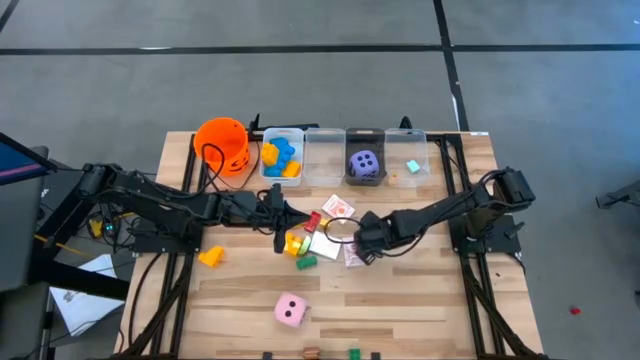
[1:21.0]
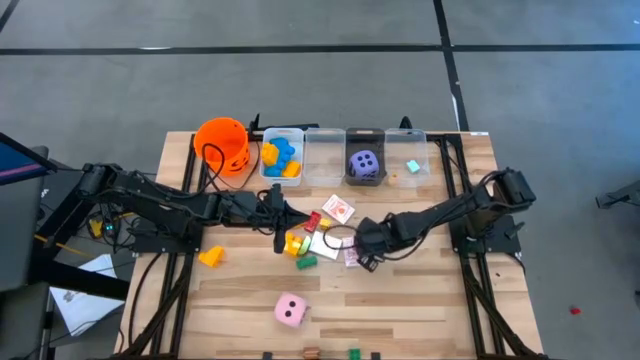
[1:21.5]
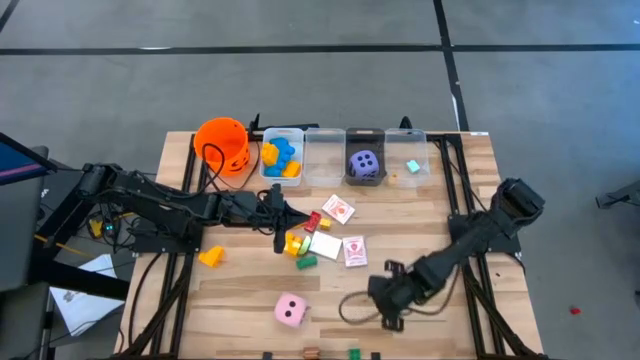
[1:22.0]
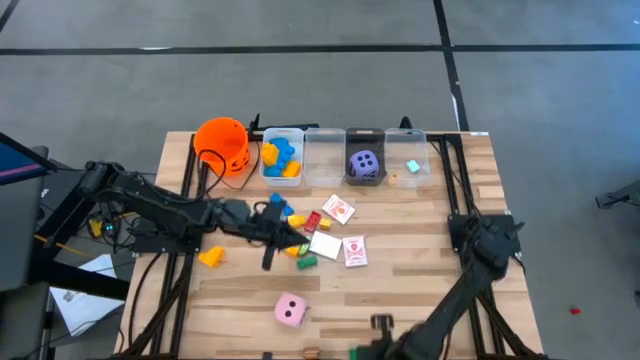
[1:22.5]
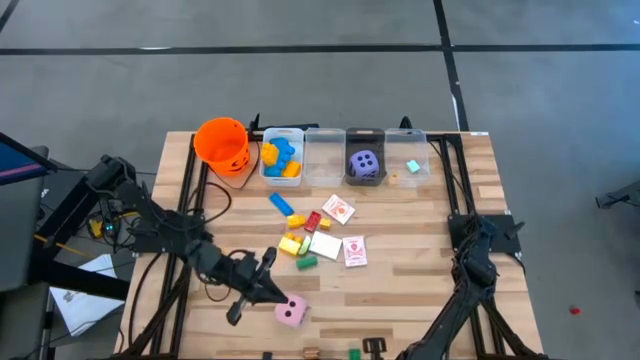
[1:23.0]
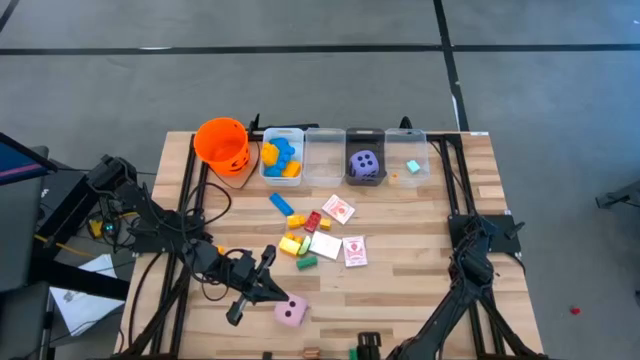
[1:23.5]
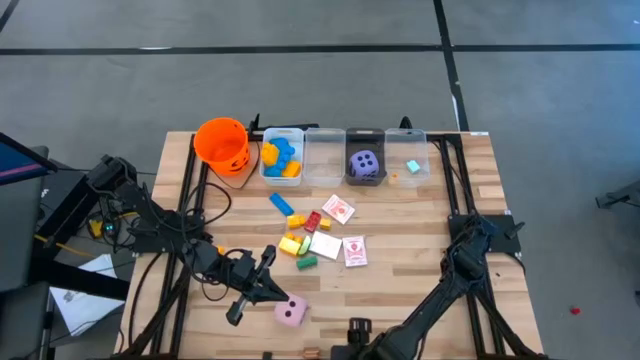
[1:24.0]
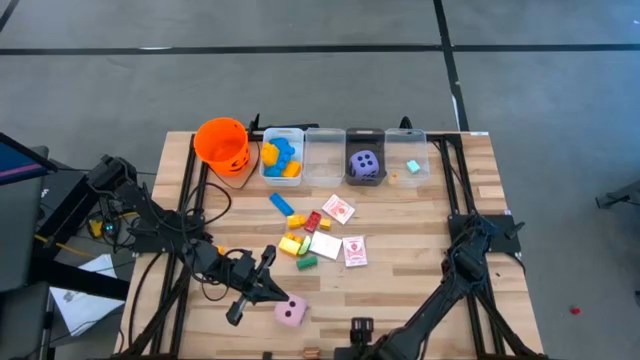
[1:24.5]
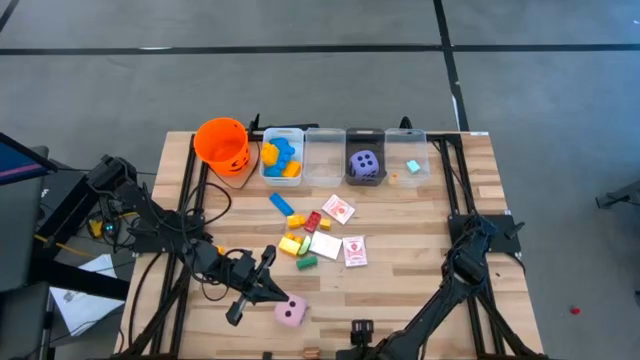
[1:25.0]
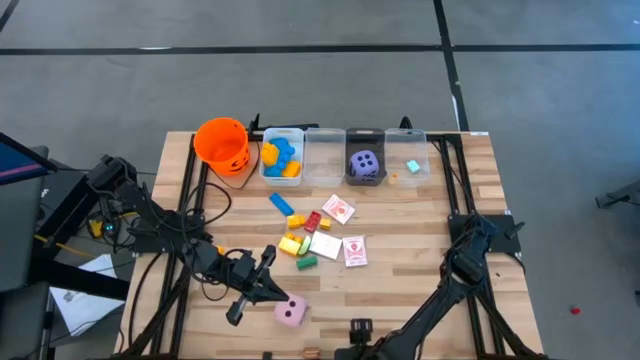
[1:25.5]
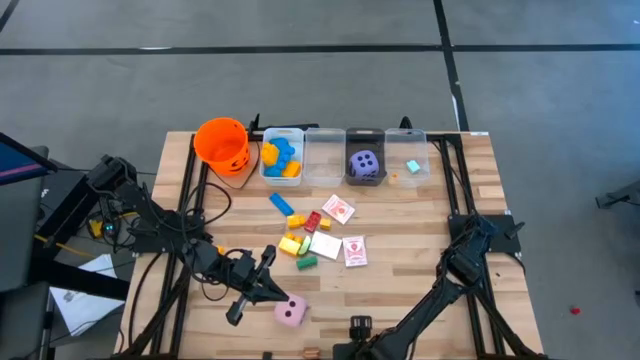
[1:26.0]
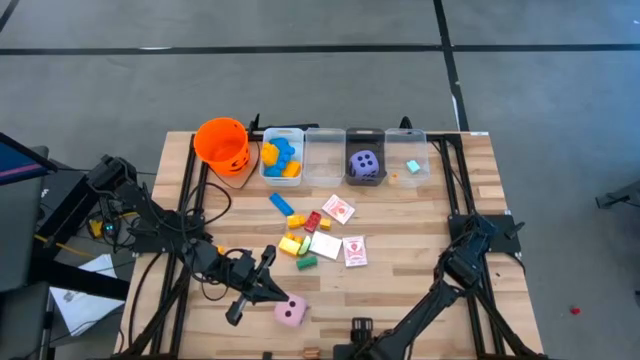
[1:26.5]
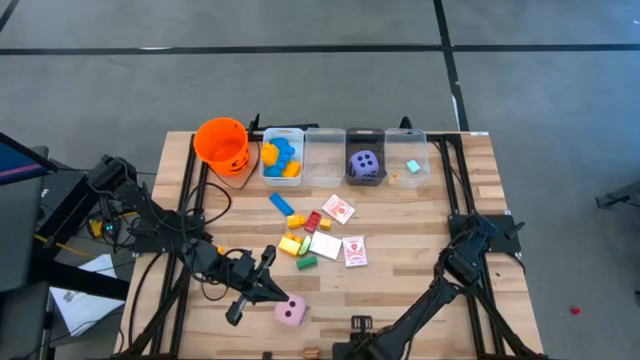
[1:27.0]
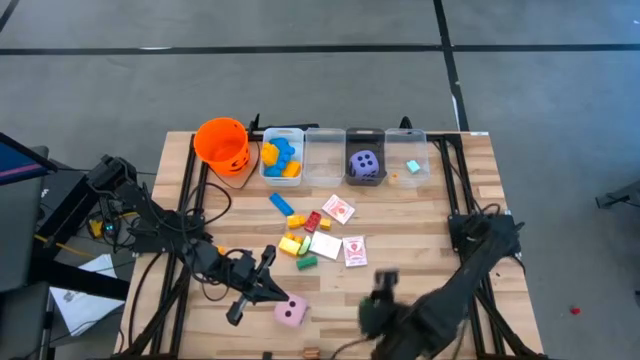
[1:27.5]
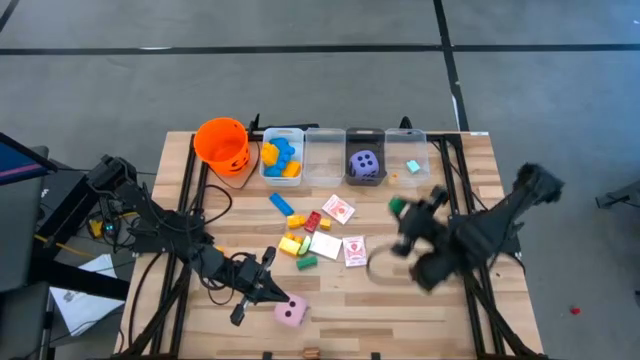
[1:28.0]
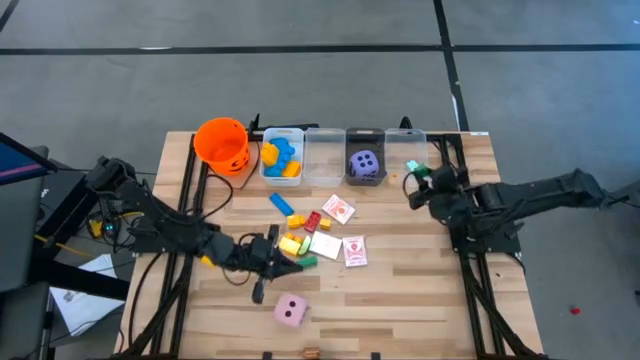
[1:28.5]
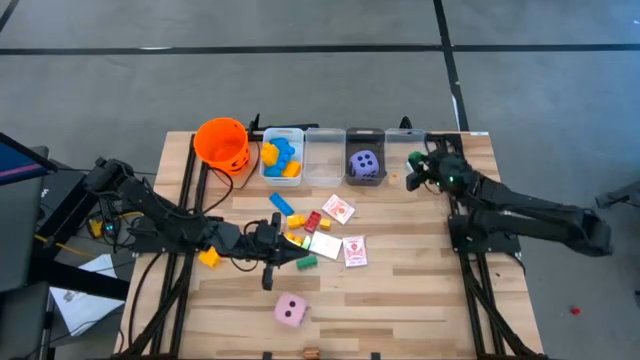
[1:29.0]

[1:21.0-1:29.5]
Task: Pick & Place Toys
Put the bottom green game piece into the right transparent bin

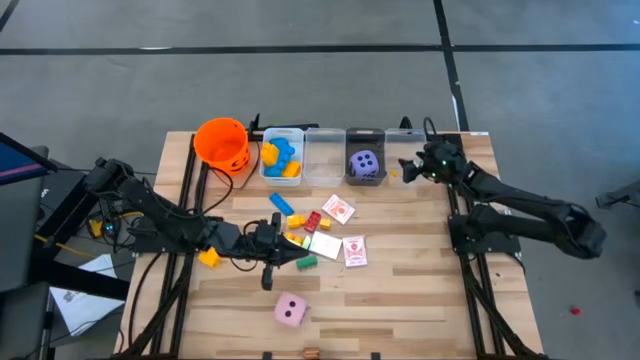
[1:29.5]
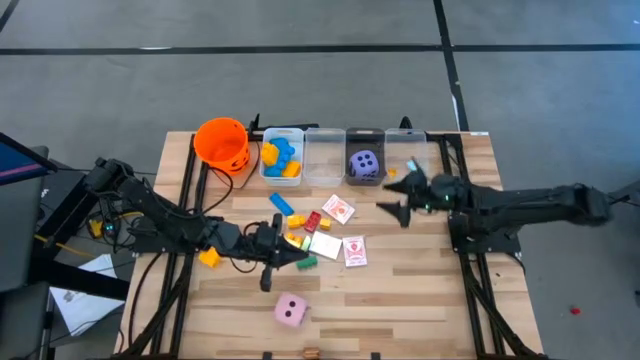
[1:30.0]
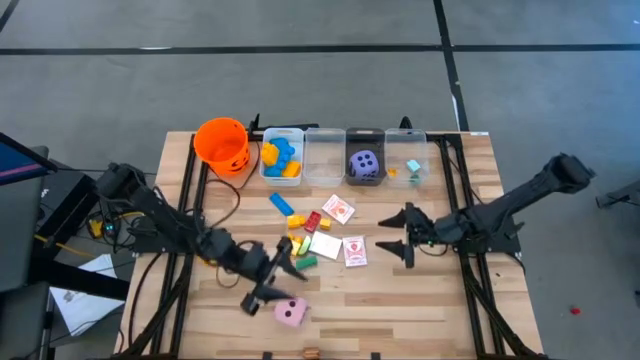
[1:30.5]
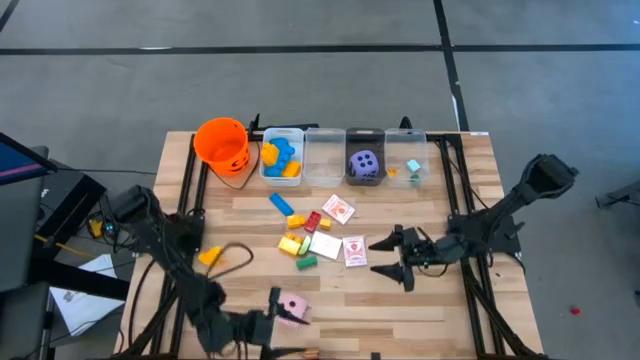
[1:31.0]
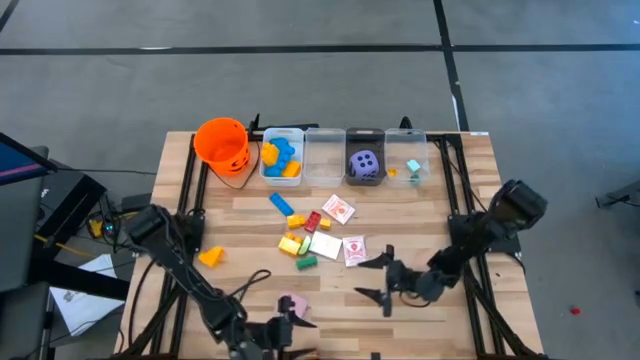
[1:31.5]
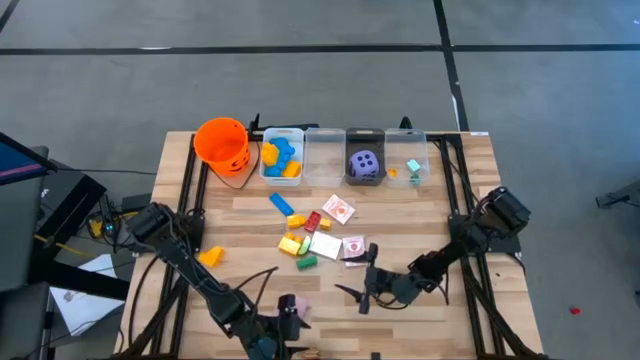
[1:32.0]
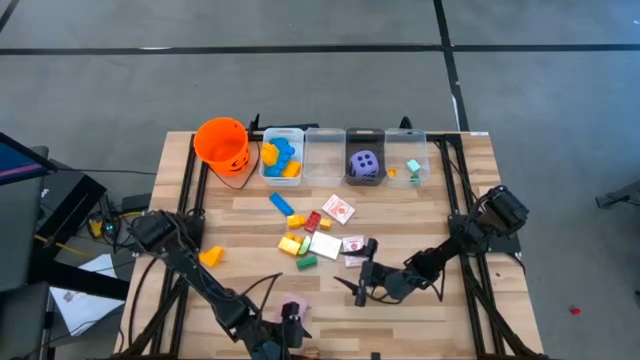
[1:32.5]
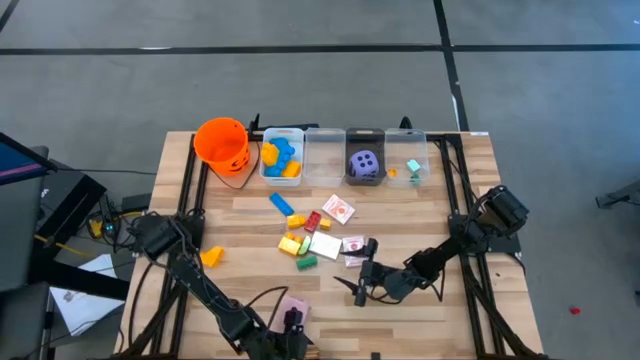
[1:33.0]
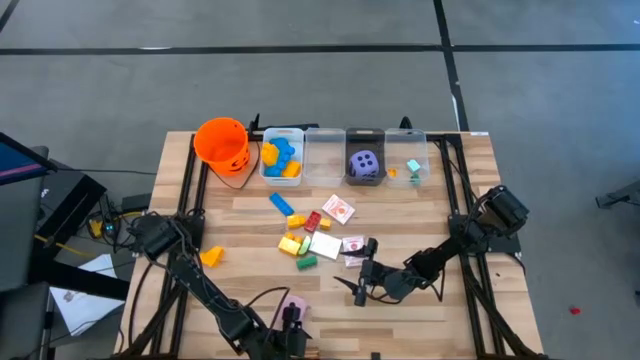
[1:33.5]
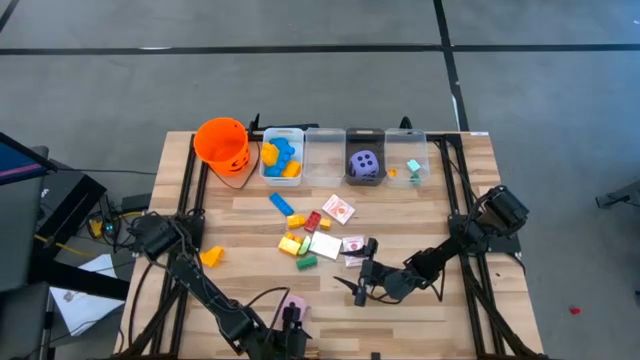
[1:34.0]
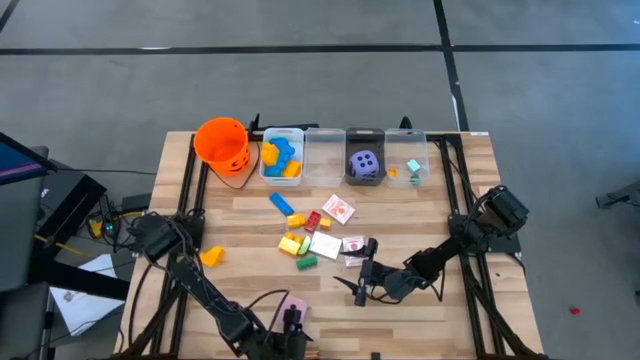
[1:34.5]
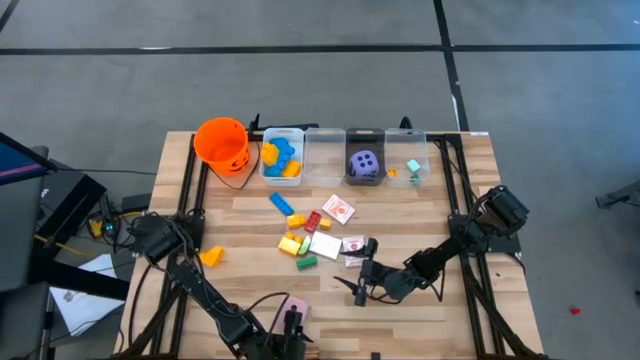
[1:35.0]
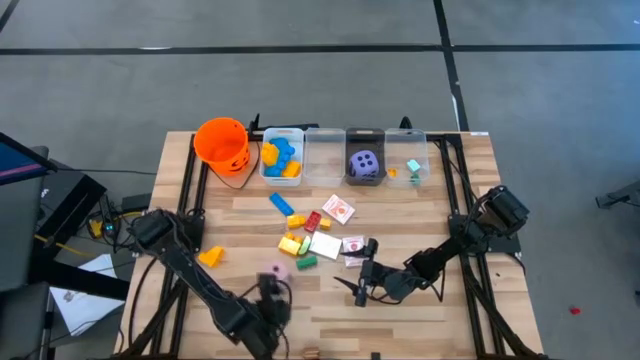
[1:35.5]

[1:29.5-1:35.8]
Move the pink dice to the middle left of the table

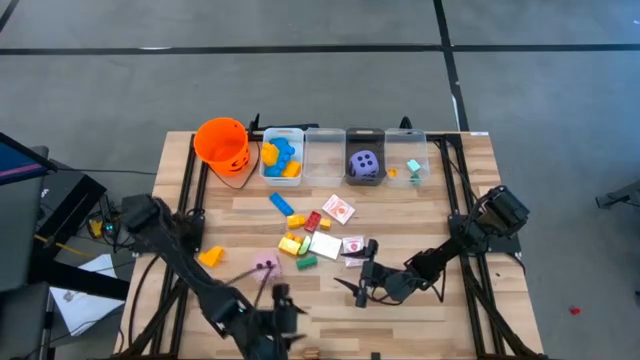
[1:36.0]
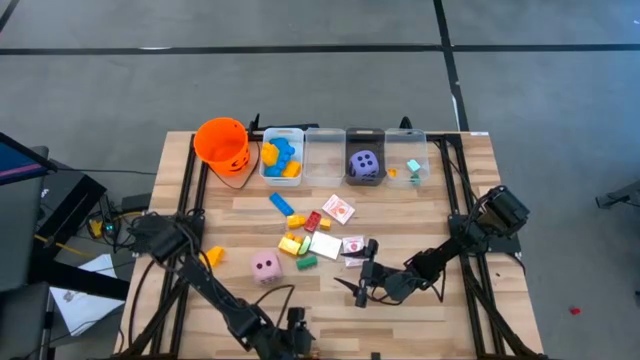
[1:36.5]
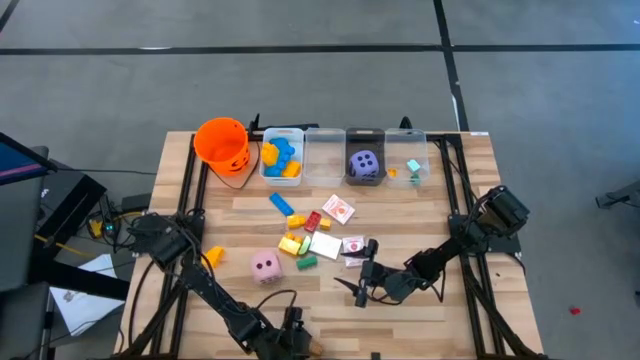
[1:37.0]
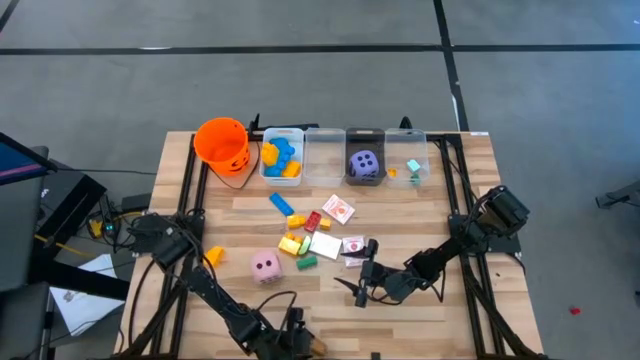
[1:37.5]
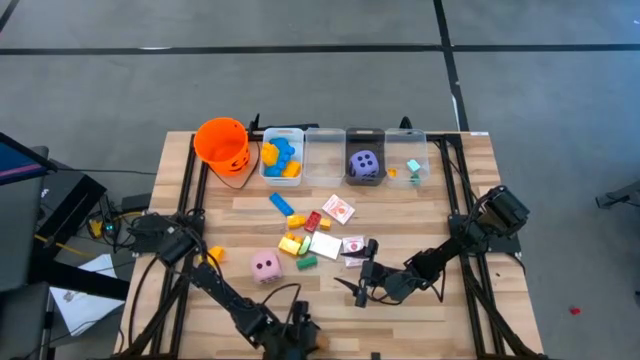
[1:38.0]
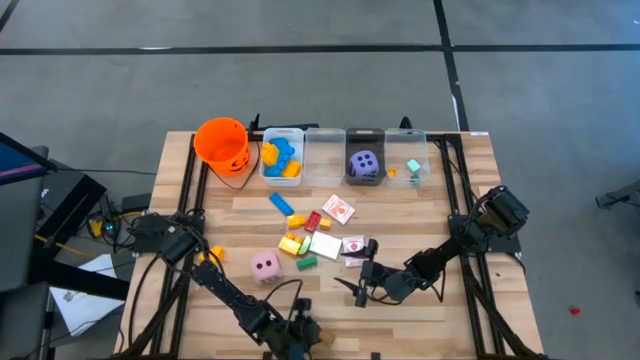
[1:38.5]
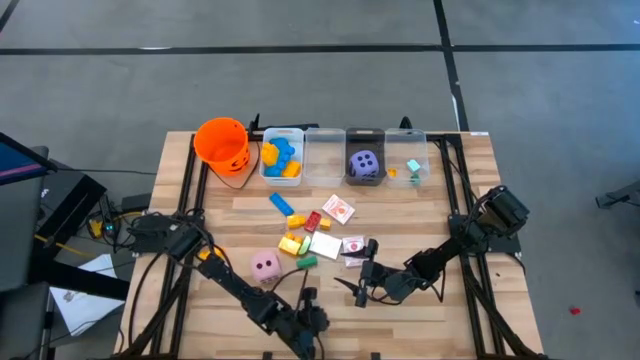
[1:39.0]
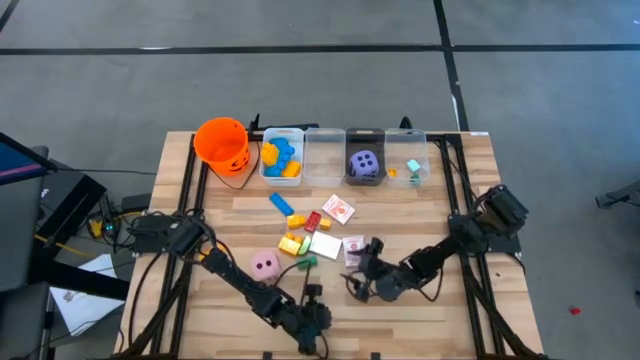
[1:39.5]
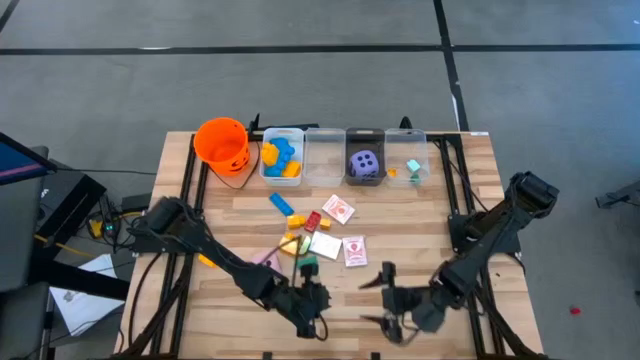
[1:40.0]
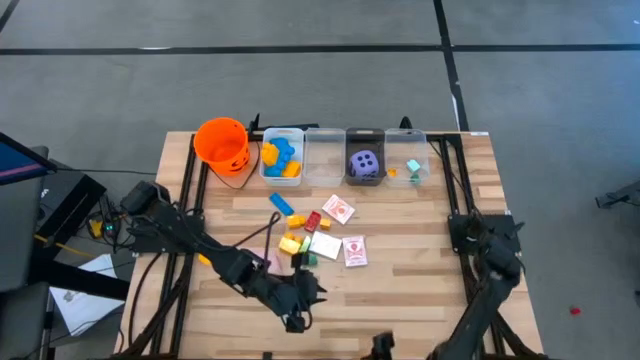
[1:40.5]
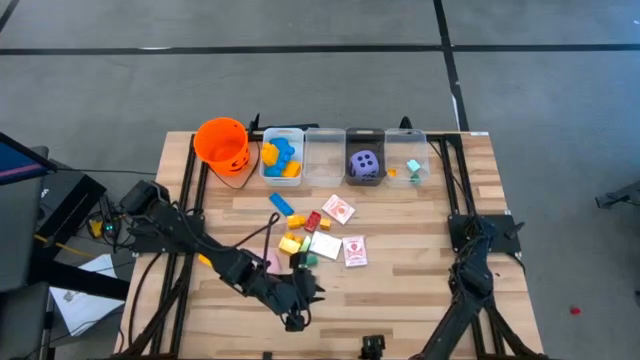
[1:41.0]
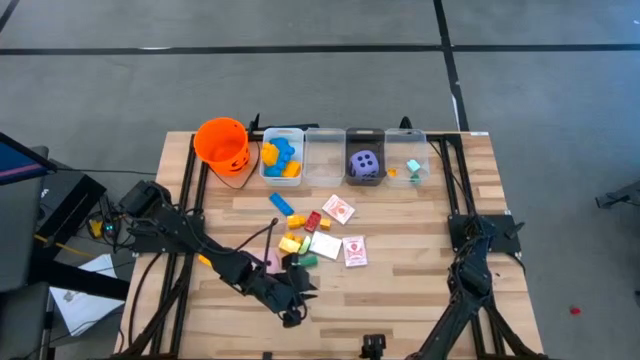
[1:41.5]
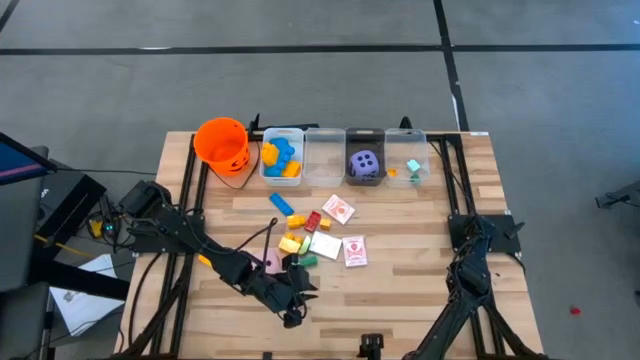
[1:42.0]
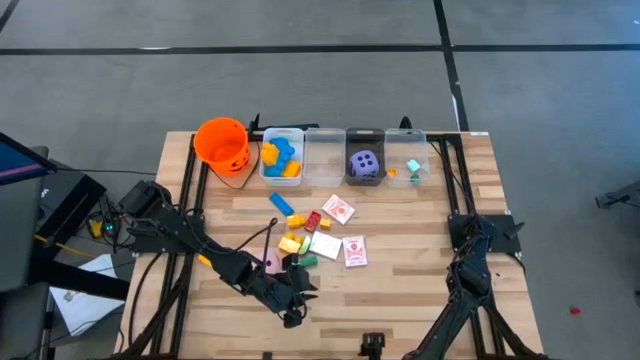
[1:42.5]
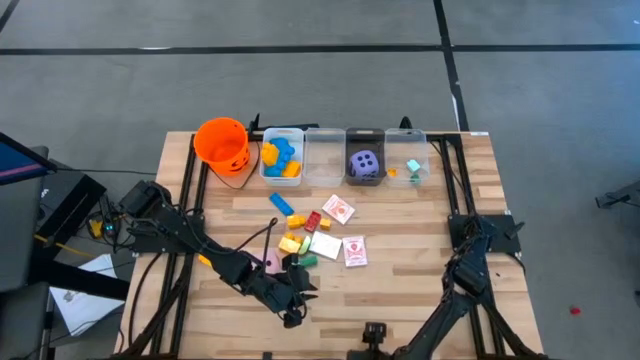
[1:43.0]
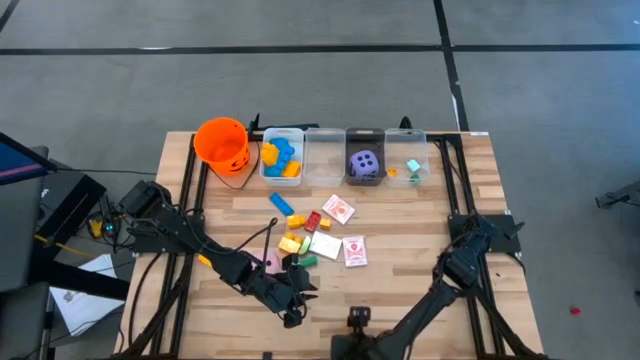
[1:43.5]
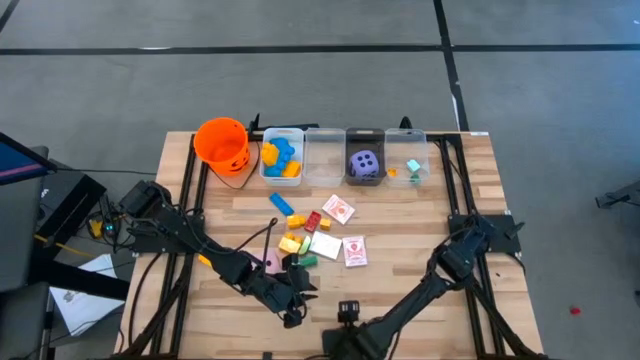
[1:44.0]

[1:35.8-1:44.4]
Put the brown game piece into the right transparent bin
